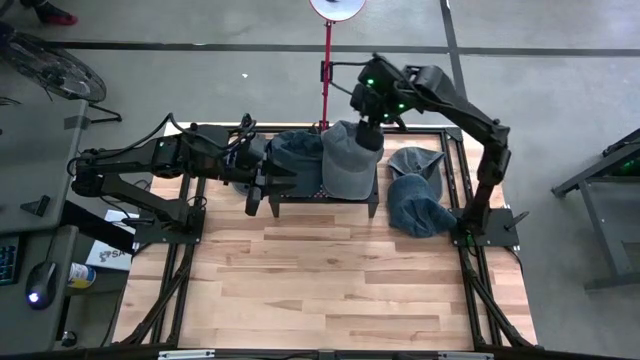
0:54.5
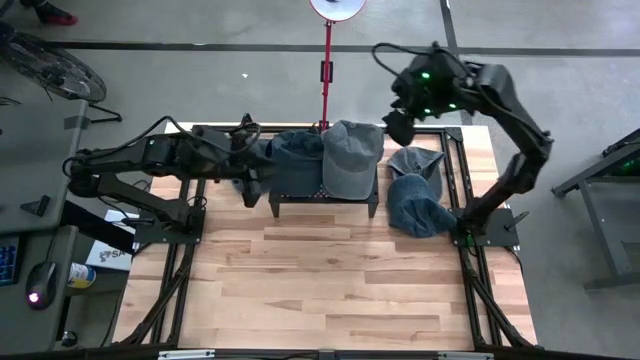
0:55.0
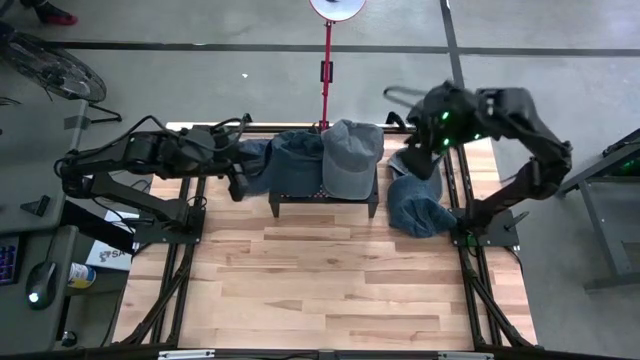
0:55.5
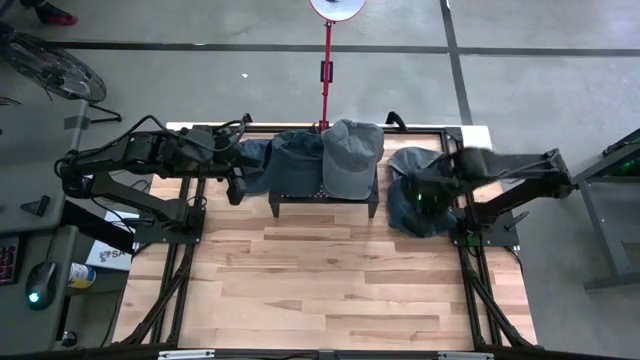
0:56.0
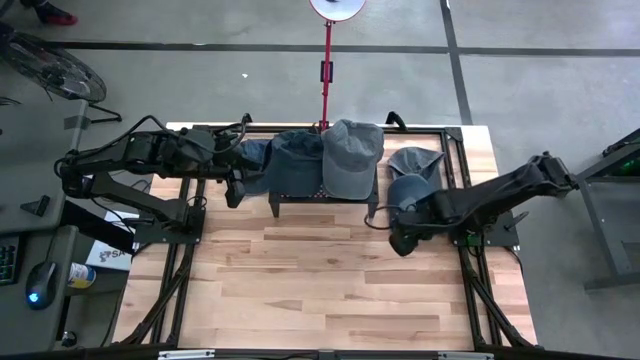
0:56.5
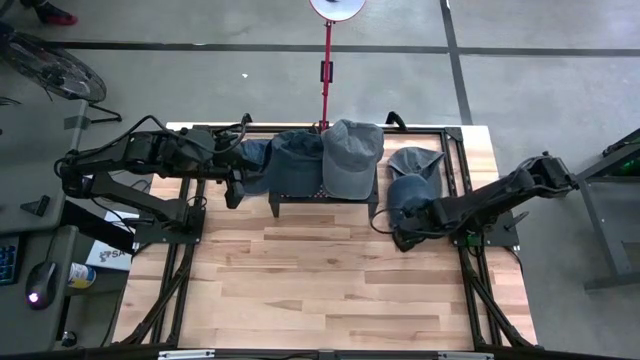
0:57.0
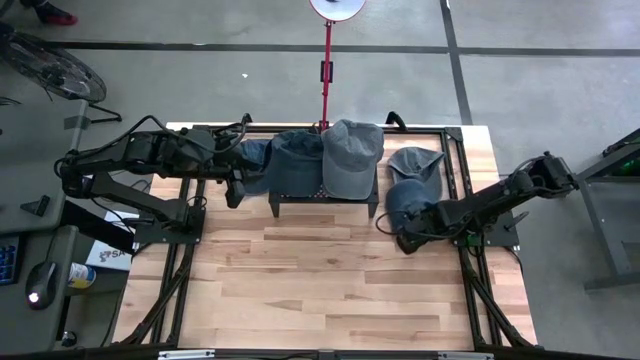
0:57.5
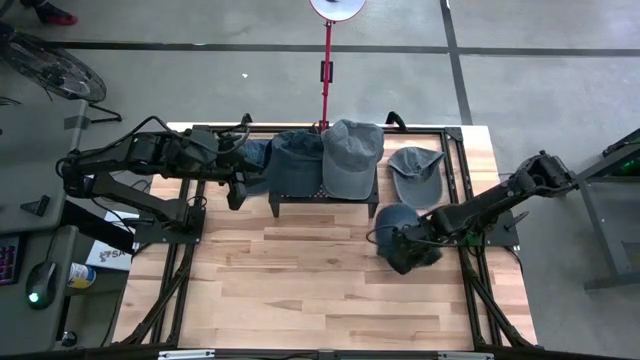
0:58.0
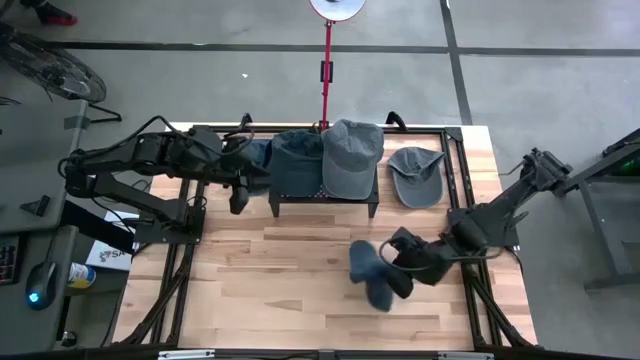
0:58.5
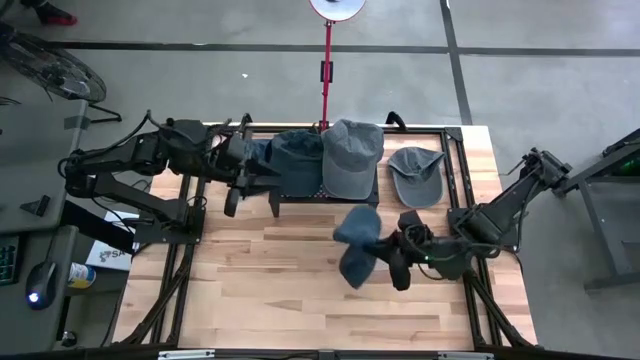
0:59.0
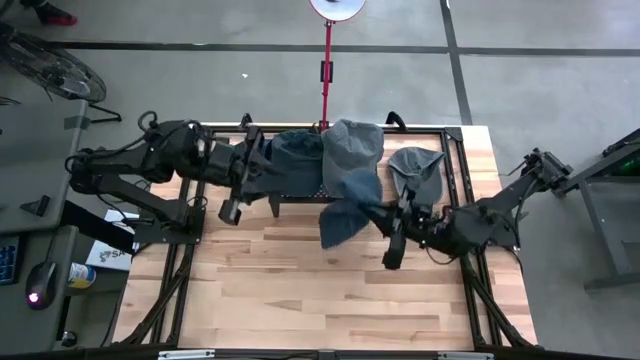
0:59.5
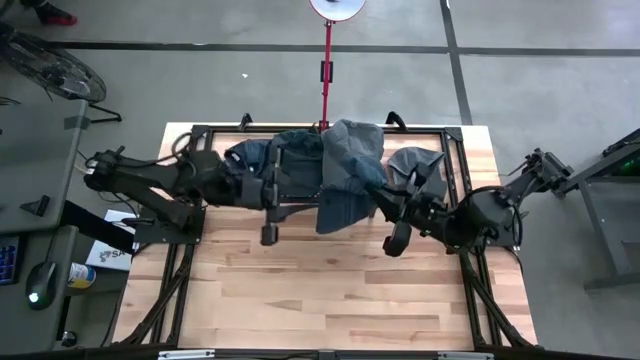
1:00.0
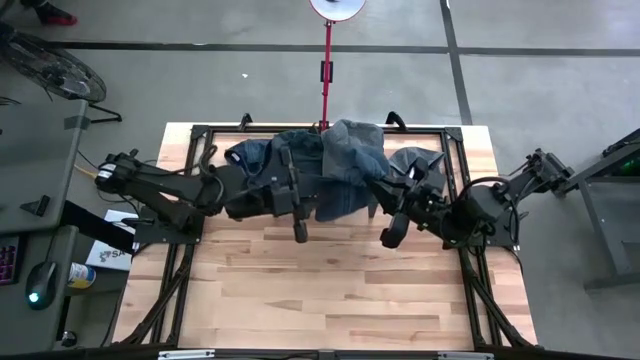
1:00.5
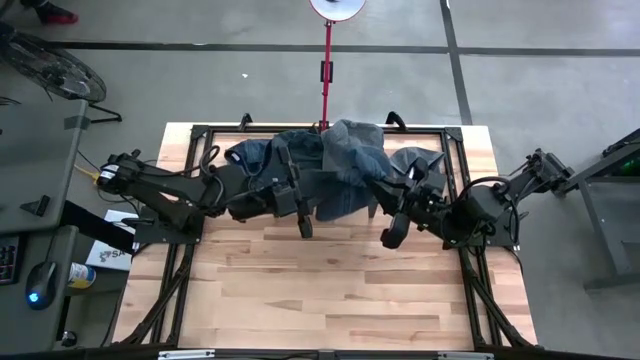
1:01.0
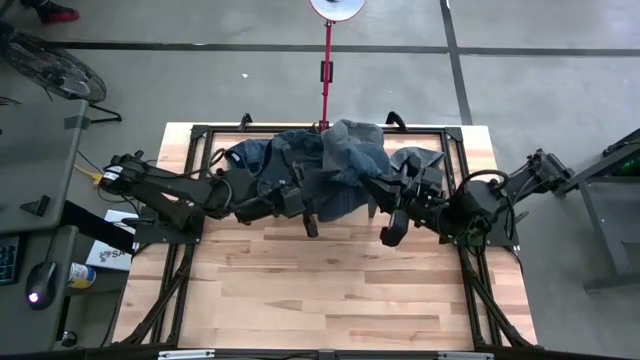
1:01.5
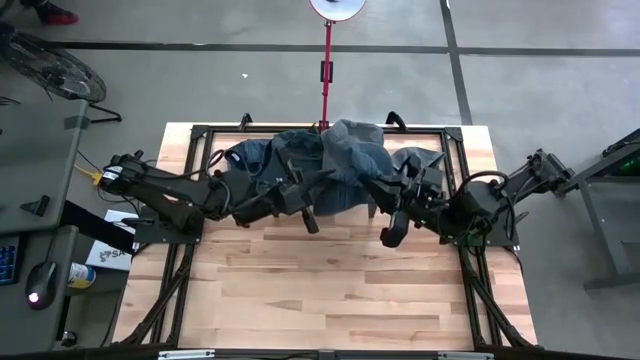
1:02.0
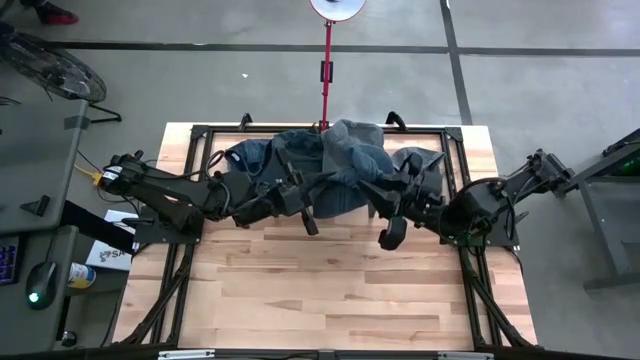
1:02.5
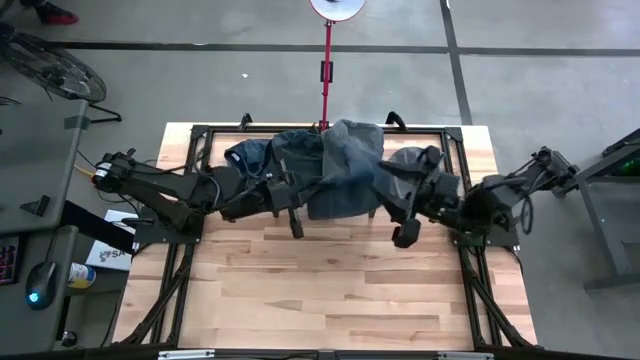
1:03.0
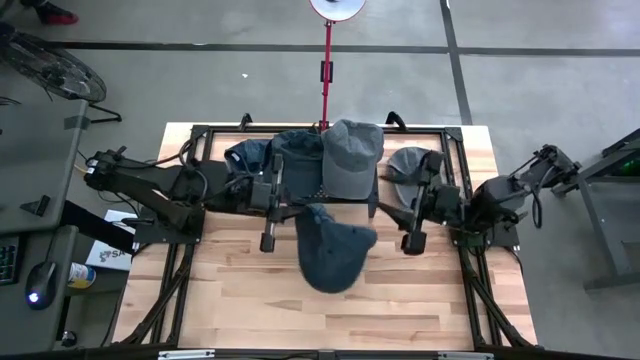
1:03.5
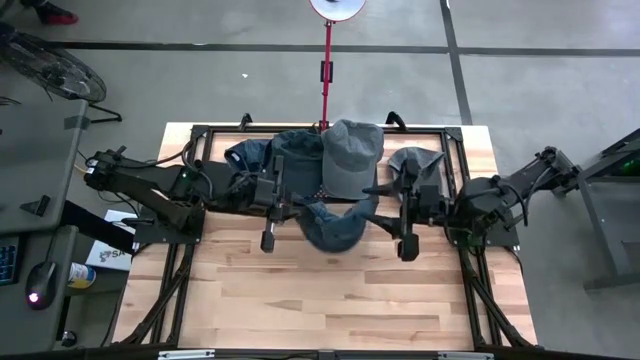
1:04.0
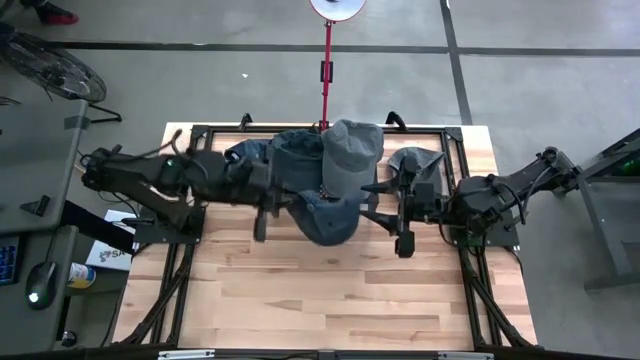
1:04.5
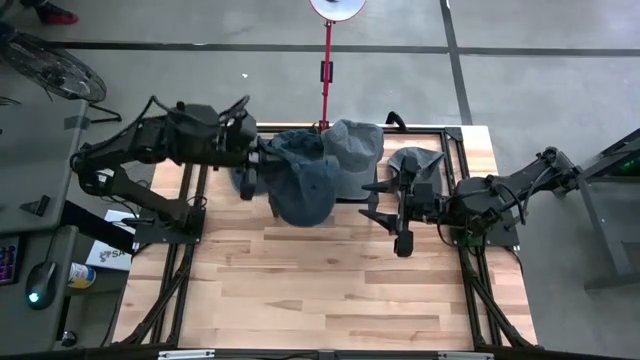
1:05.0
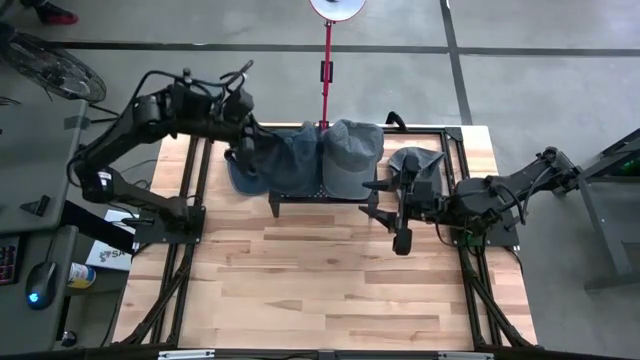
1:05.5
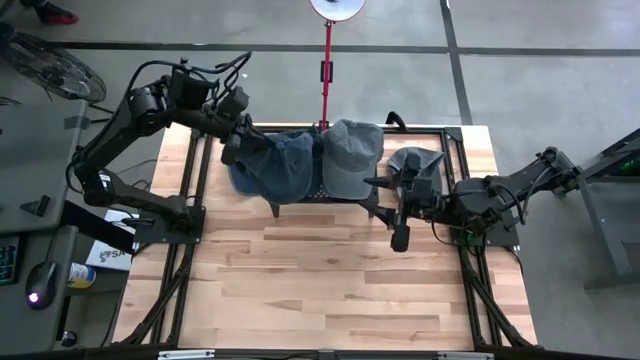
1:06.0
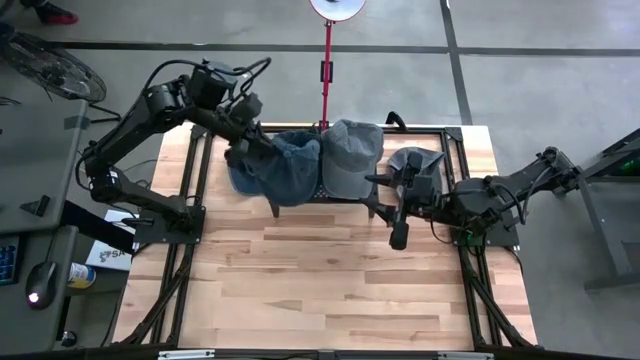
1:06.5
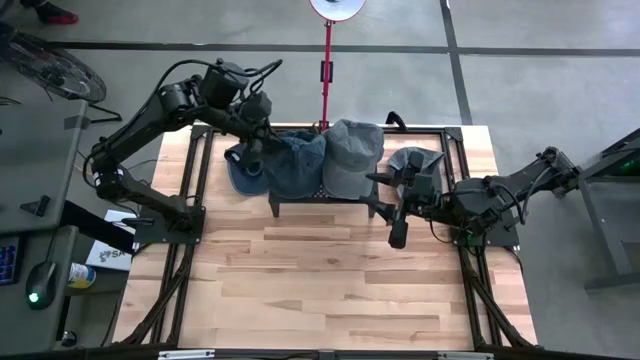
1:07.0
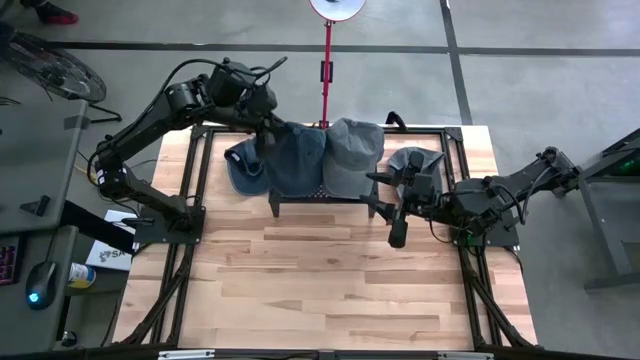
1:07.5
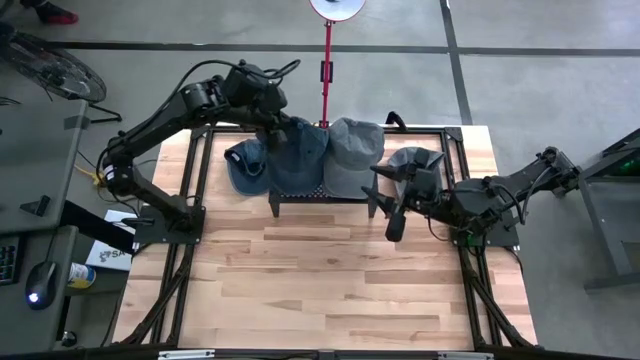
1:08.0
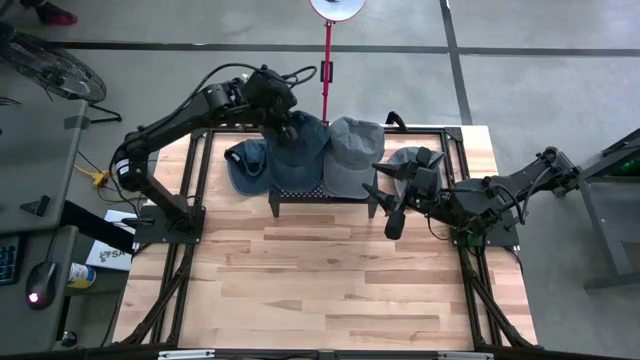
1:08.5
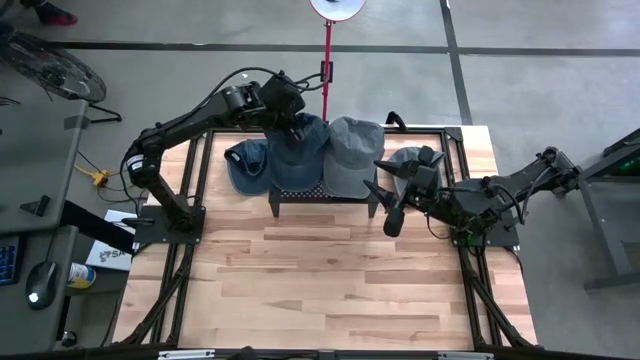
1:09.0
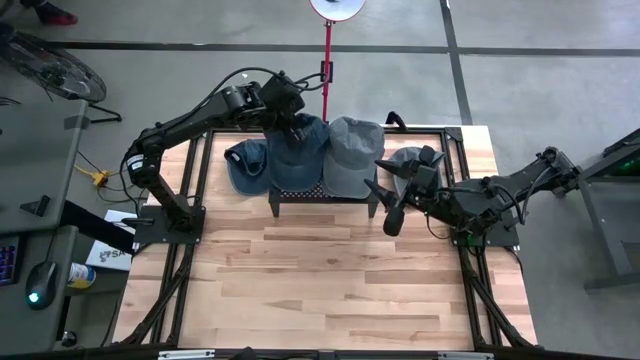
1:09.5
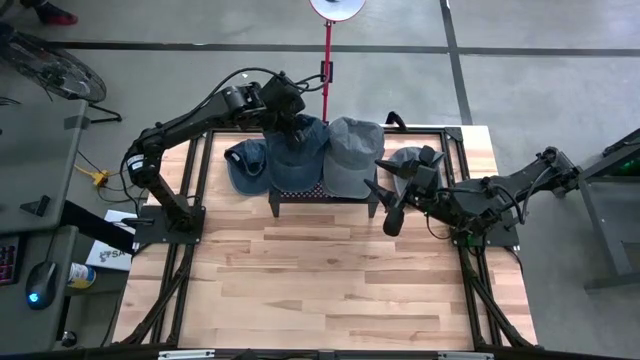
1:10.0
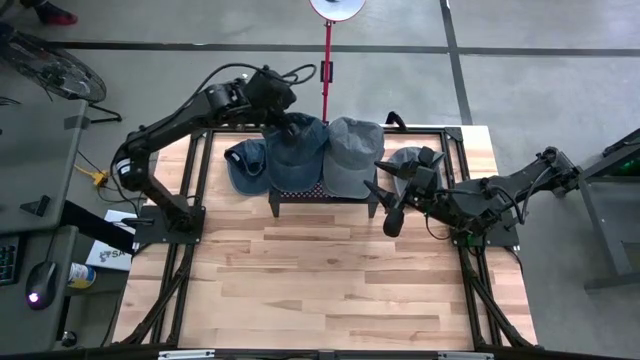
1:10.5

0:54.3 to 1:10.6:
Task: Pick & Place hat
Stack the right black cap on the black cap
